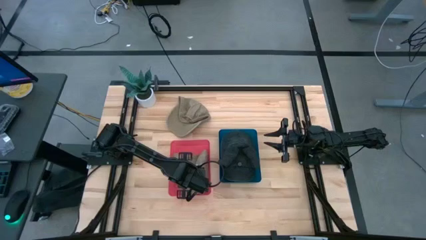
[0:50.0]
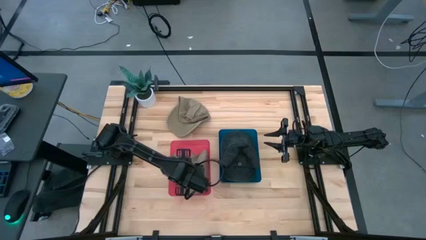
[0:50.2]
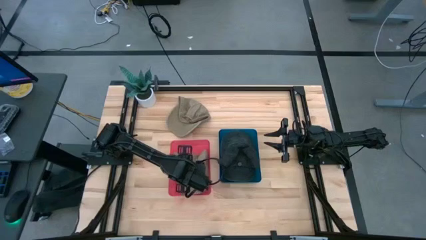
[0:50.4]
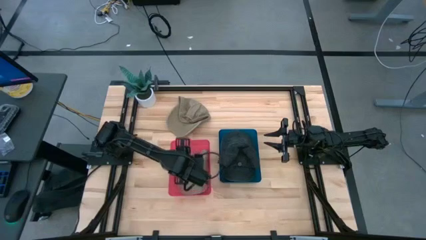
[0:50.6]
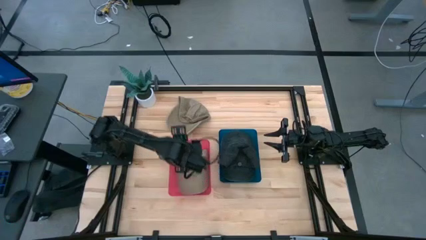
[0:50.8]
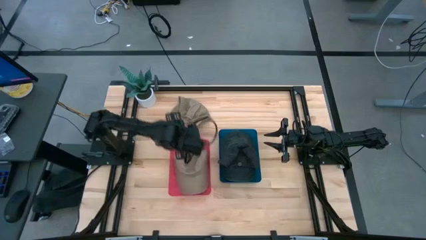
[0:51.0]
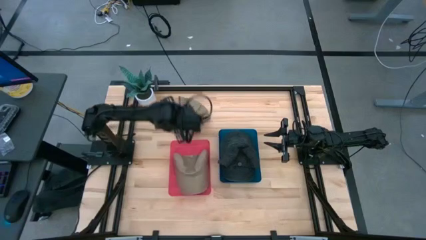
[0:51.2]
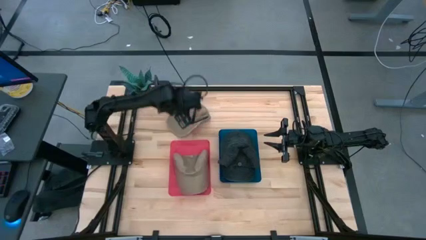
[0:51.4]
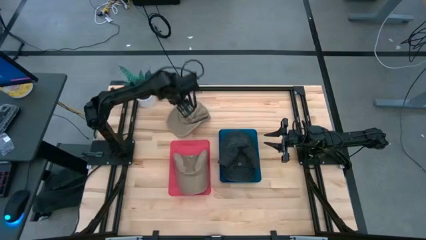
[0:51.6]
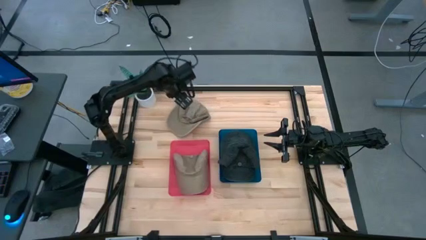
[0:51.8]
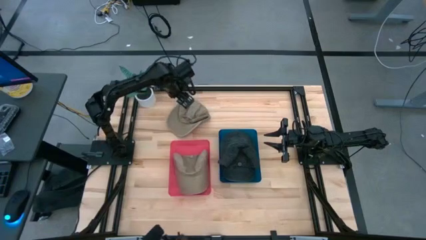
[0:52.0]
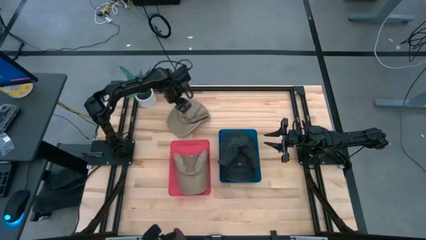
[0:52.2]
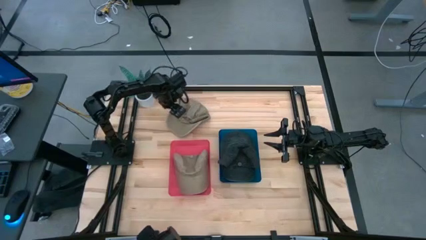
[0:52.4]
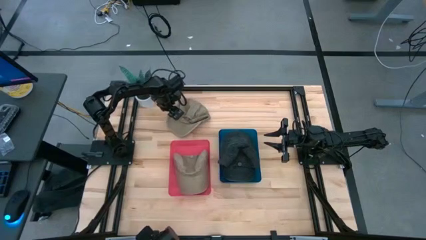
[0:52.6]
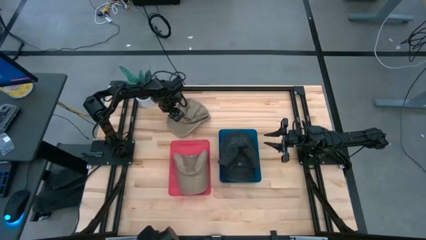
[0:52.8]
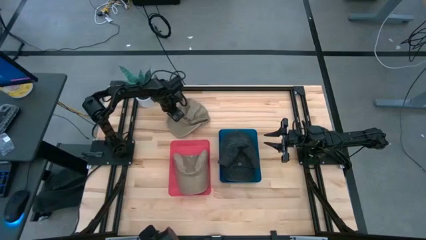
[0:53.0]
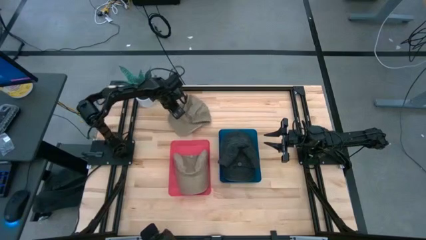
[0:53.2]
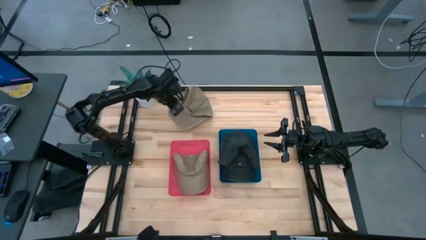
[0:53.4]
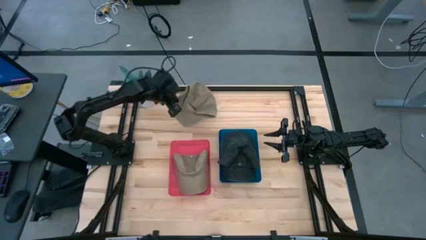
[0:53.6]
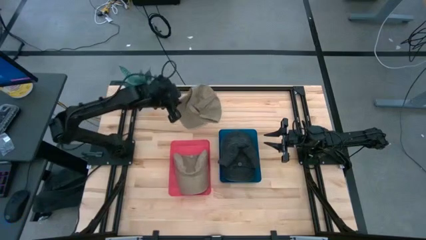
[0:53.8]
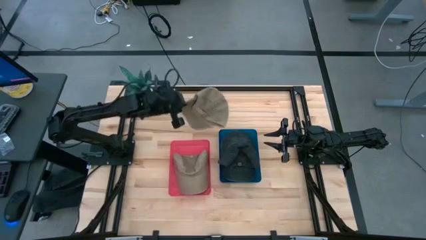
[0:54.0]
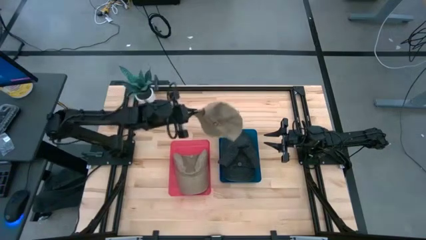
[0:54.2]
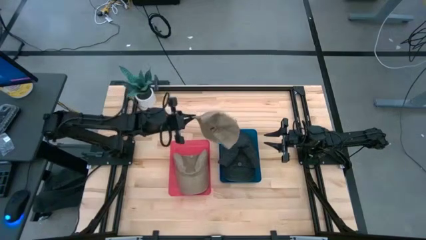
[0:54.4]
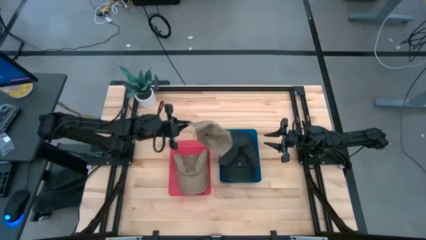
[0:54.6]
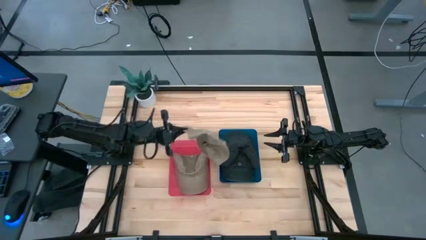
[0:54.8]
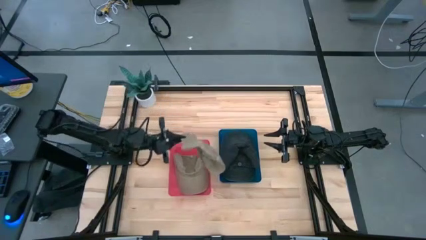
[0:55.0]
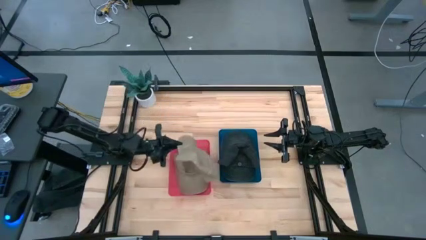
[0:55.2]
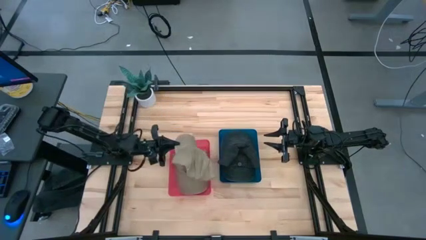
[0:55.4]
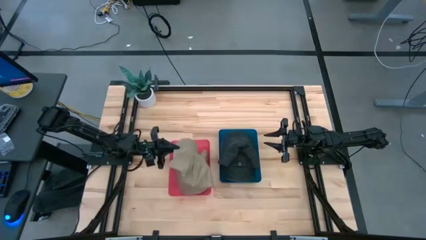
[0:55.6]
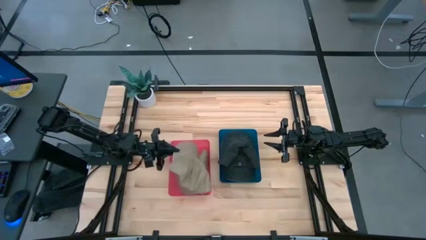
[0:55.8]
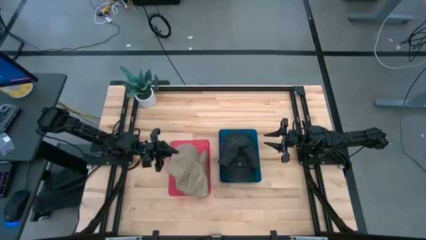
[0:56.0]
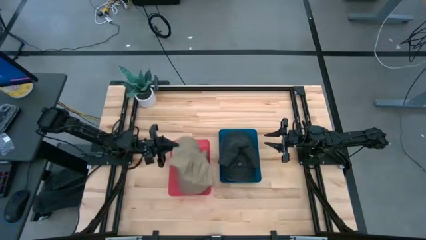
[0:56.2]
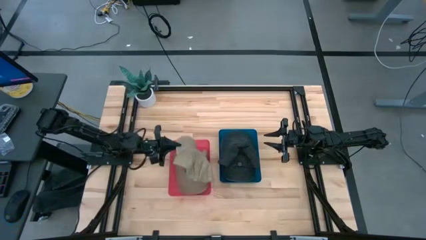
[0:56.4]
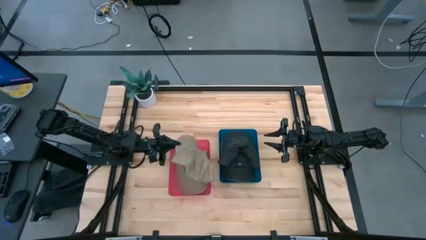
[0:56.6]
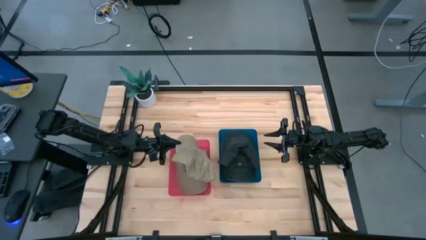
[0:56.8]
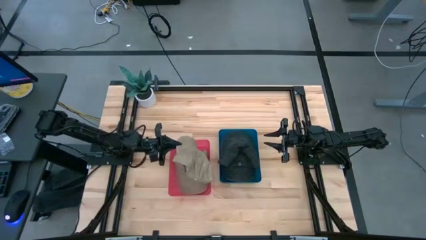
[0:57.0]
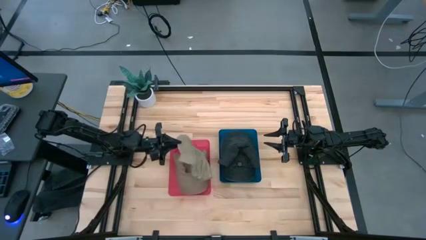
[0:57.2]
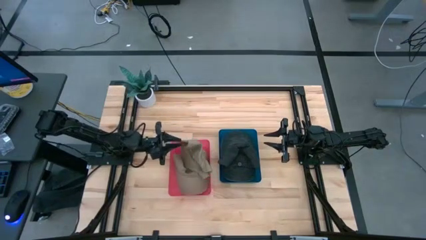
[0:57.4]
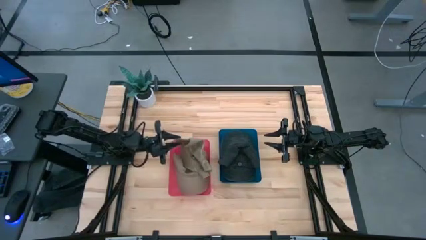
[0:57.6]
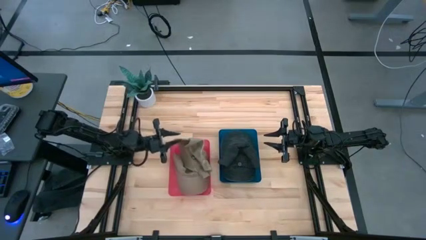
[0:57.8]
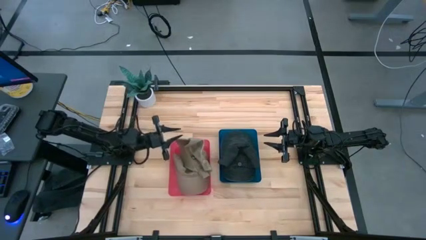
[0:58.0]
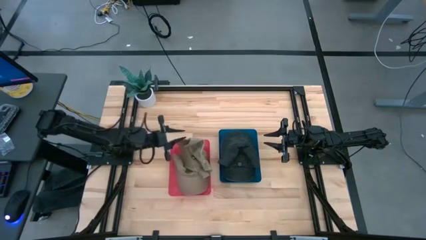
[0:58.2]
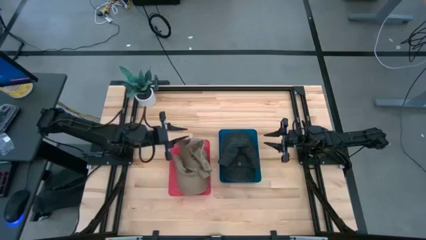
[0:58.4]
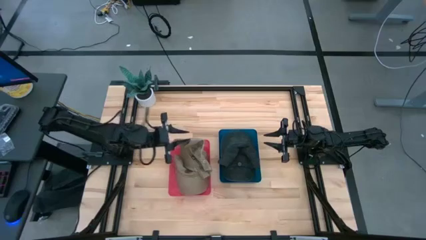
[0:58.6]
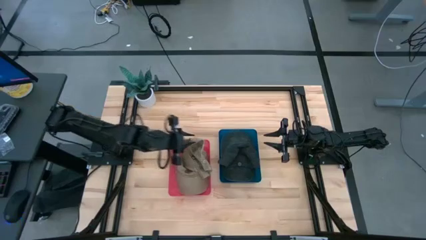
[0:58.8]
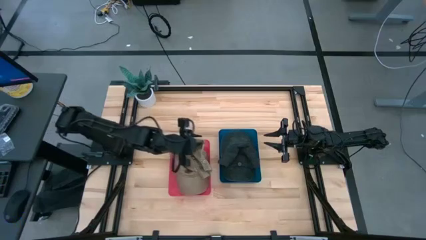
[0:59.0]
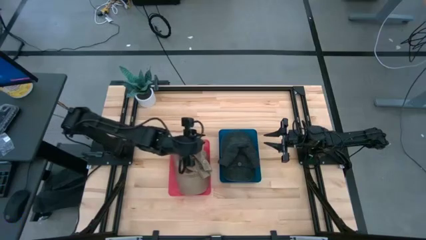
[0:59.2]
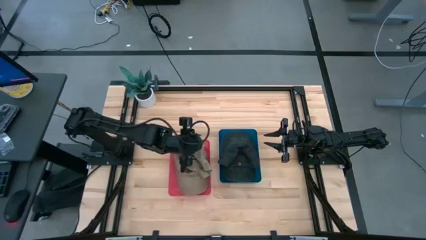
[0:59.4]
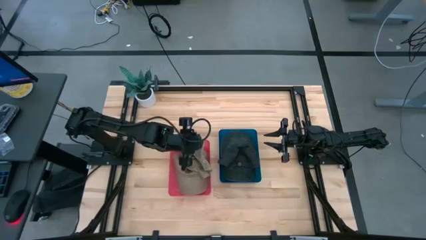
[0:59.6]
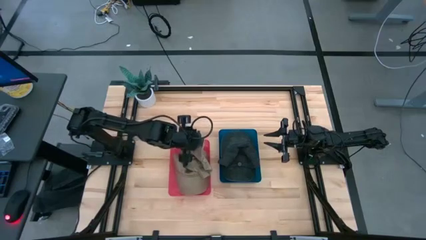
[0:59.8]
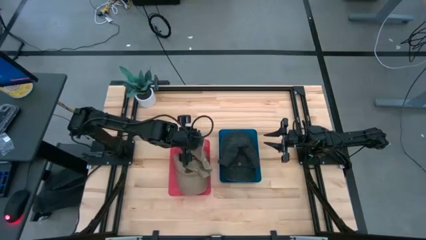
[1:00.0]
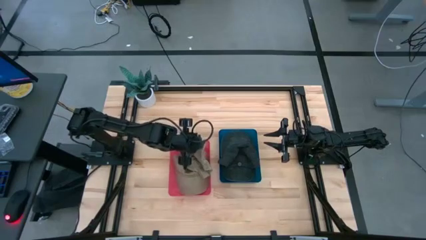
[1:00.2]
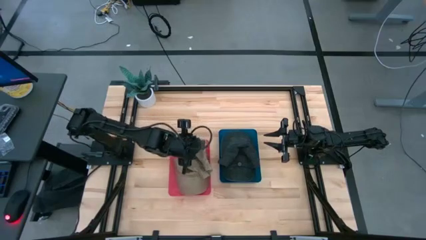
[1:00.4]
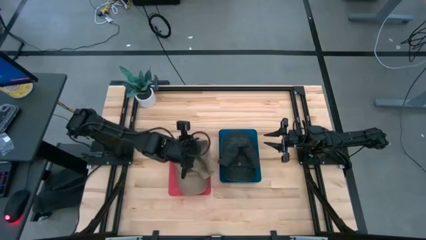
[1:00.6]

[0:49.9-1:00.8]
Task: Pick & Place hat
Put the brown cap into the red bin

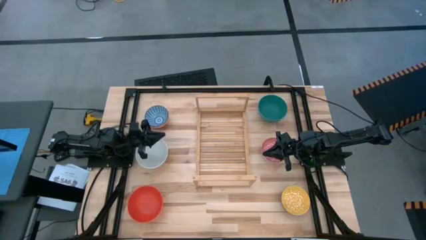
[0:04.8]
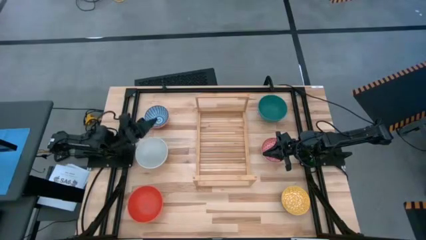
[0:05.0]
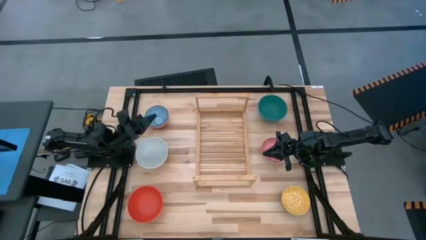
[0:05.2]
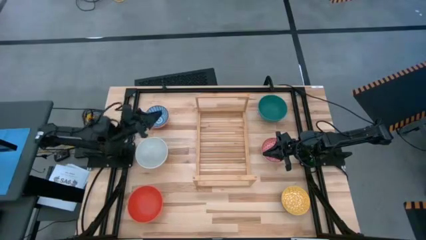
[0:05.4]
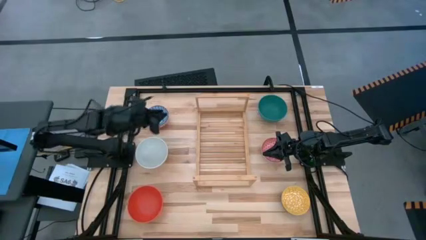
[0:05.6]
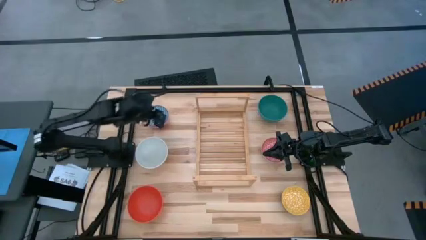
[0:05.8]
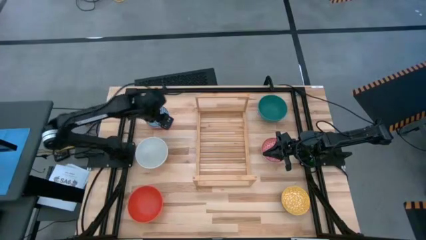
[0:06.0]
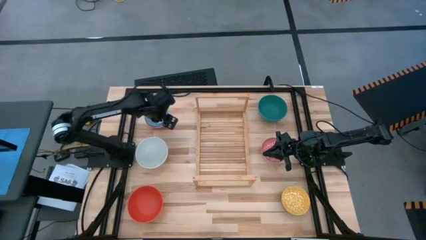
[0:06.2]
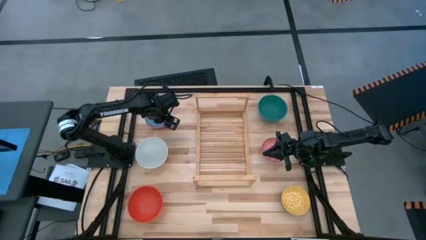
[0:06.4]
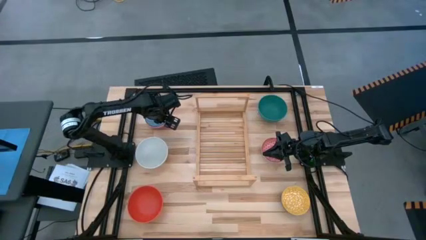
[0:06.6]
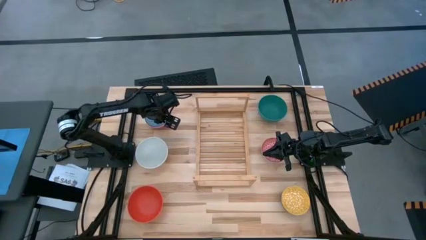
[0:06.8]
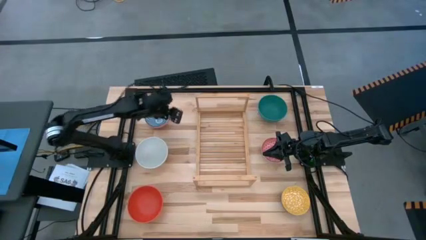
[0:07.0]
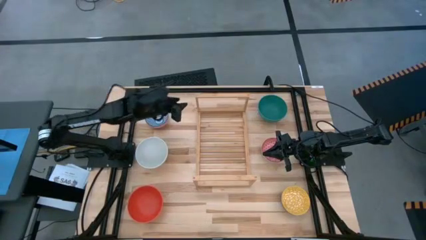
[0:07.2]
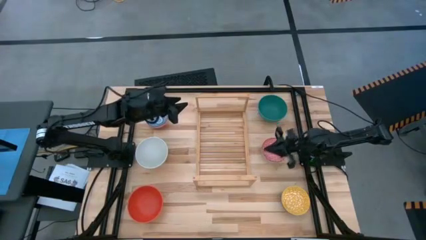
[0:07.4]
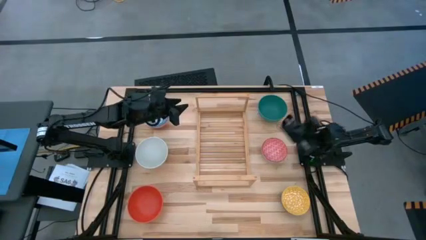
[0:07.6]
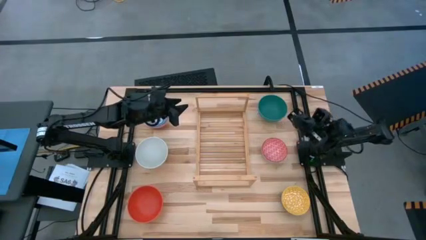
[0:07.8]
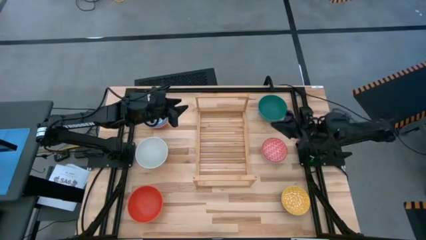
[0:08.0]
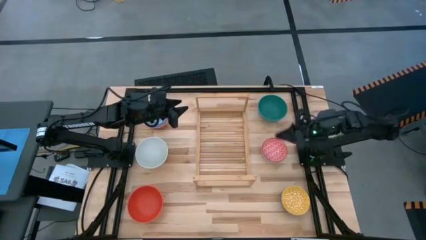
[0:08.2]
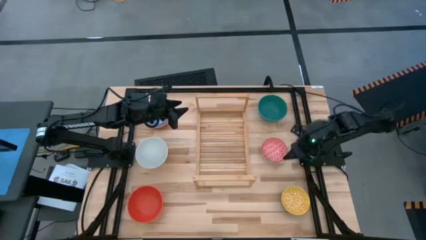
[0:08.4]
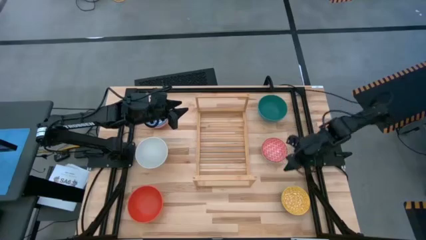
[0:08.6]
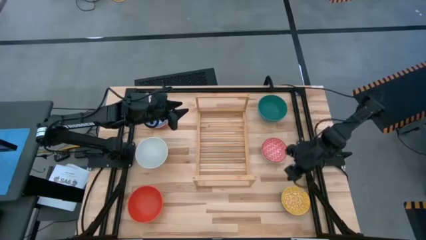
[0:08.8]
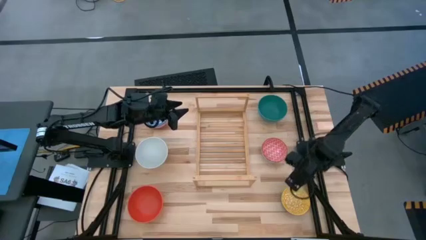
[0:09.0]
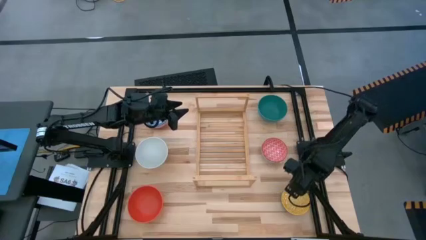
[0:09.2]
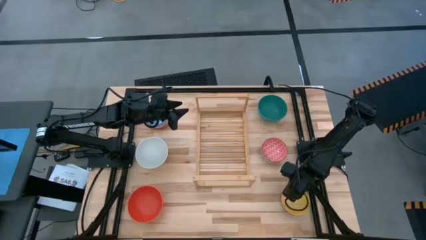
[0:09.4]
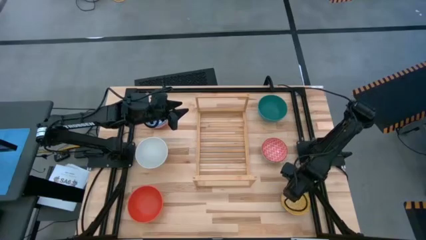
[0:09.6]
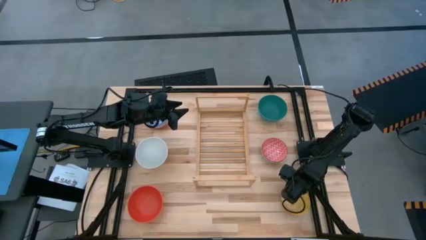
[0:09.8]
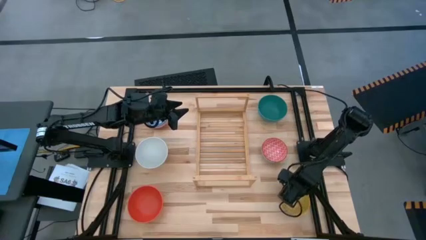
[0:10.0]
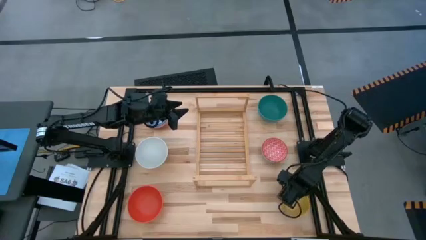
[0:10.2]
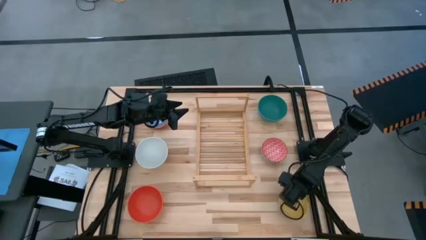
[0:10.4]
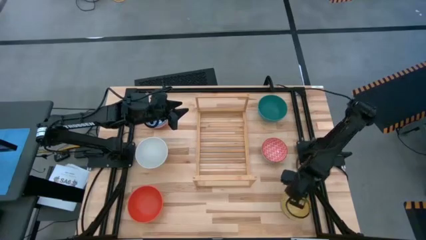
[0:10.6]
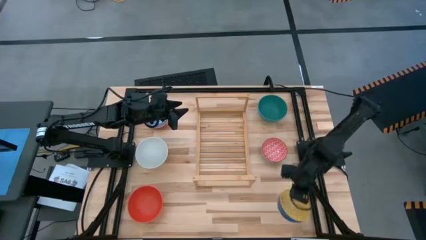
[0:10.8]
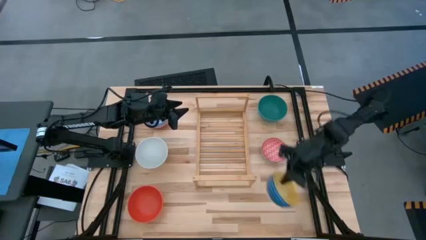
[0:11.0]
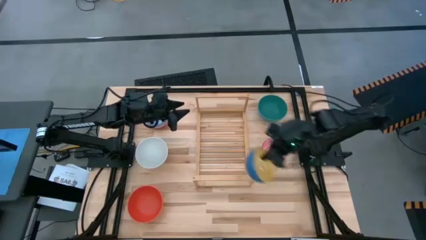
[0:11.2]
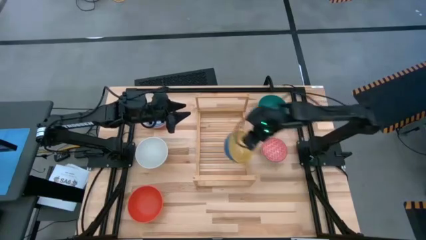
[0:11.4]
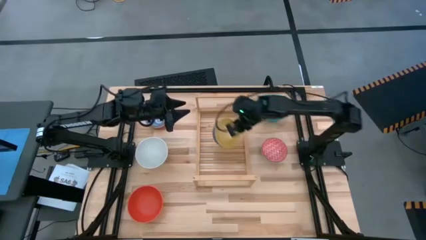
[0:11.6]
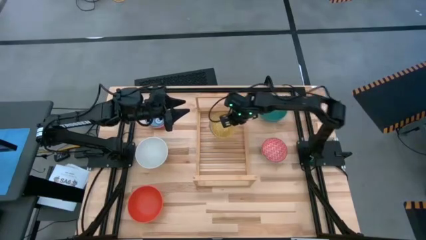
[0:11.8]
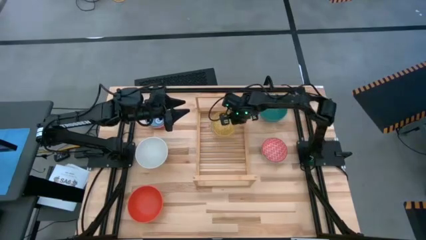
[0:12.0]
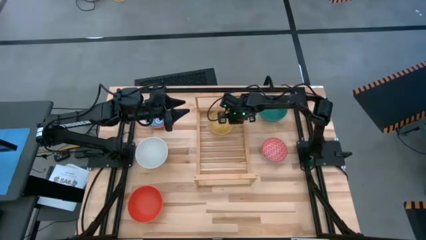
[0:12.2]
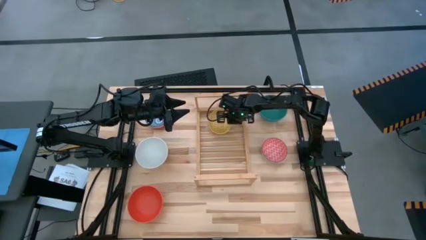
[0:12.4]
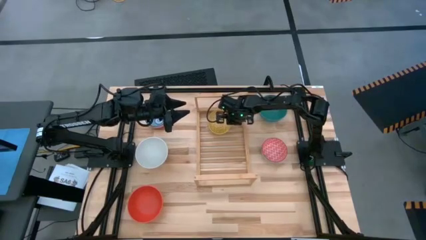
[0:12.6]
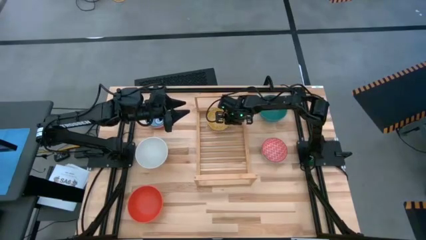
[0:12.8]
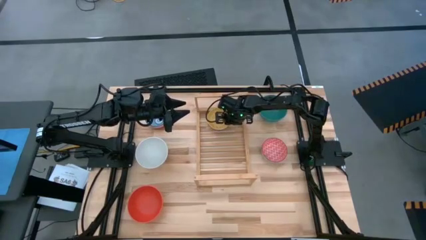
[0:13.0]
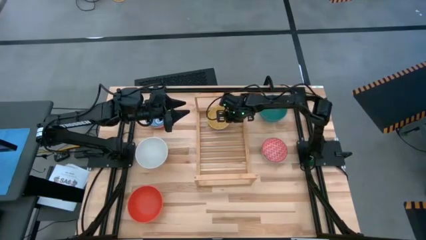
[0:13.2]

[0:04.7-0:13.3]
Task: Place and stack bowls onto a shelf
Put the yellow patterned bowl on the shelf
